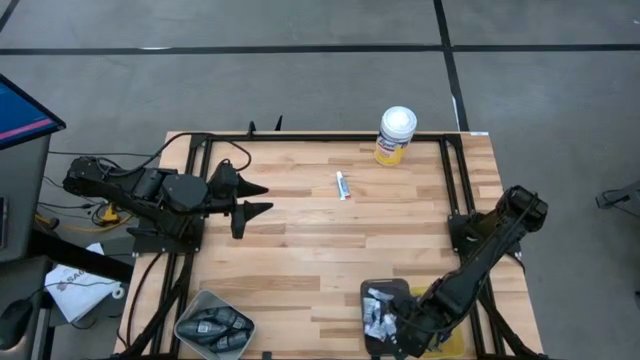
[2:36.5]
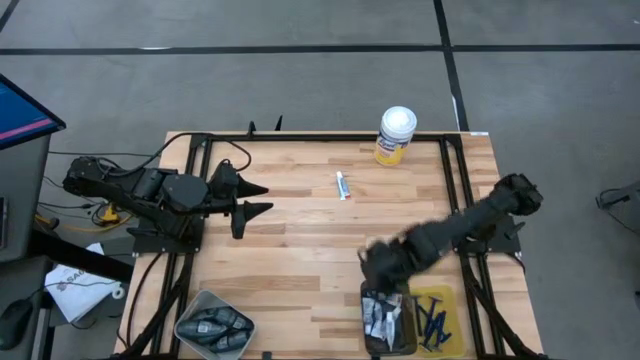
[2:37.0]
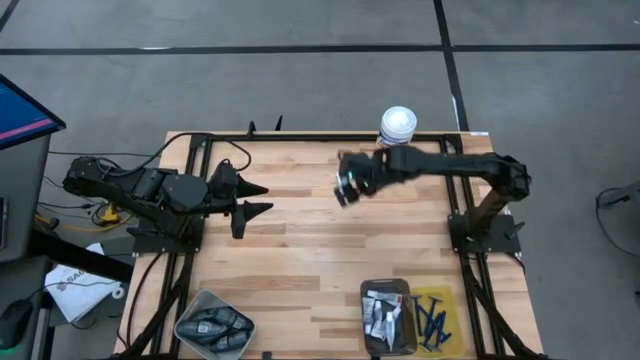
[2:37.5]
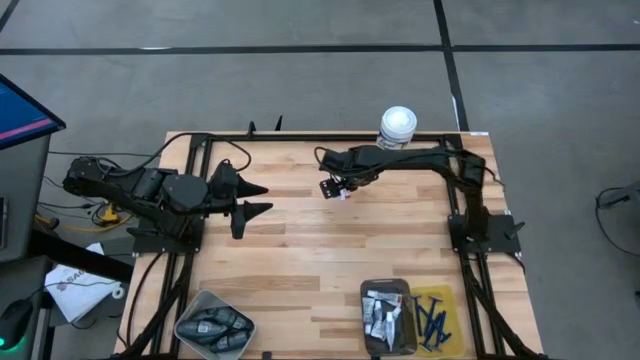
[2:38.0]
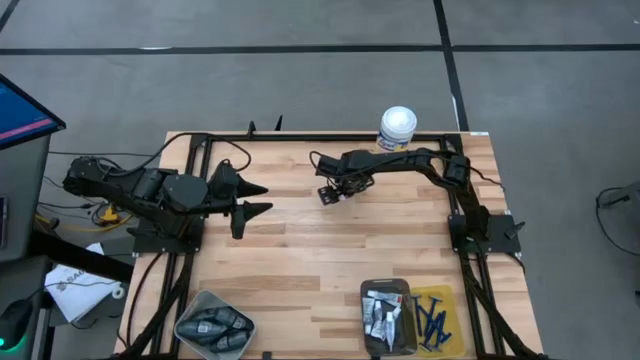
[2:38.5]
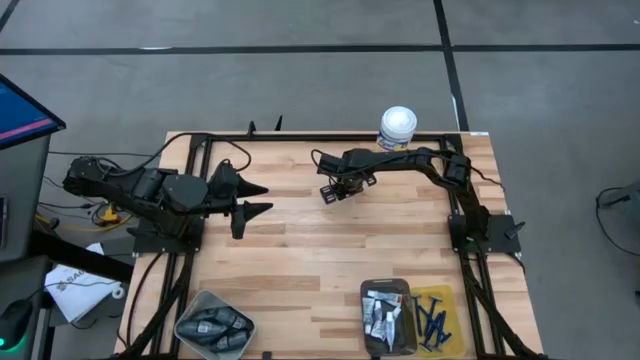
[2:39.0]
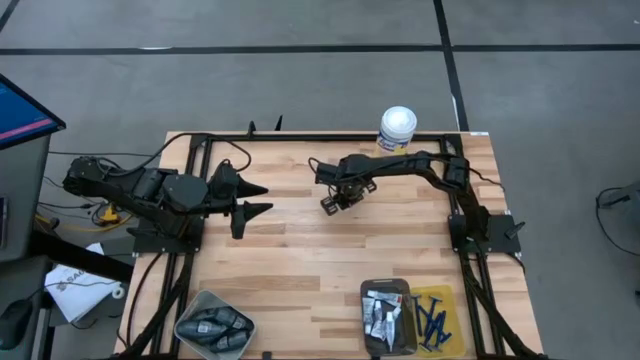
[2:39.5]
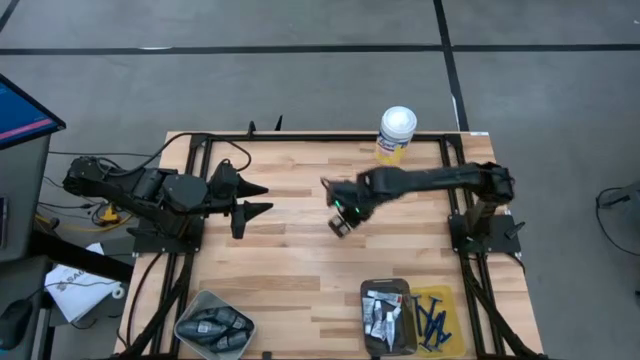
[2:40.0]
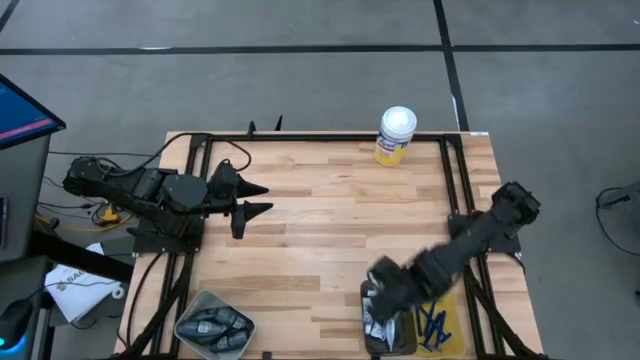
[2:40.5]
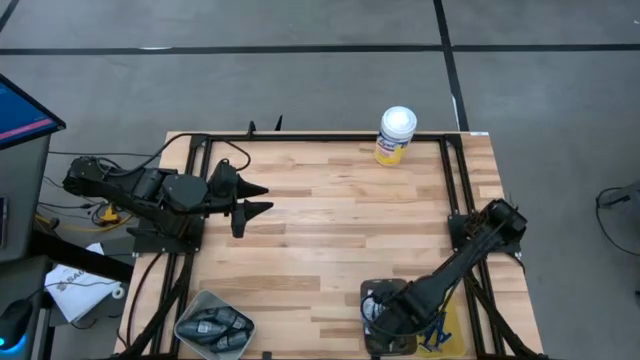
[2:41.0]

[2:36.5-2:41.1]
Task: Pick & Place Travel size toiletries
Put the toothpaste into the black bin

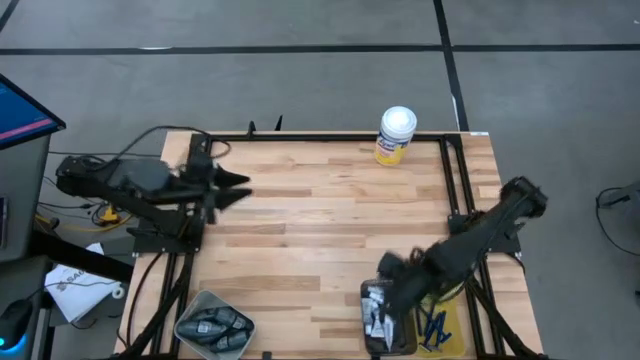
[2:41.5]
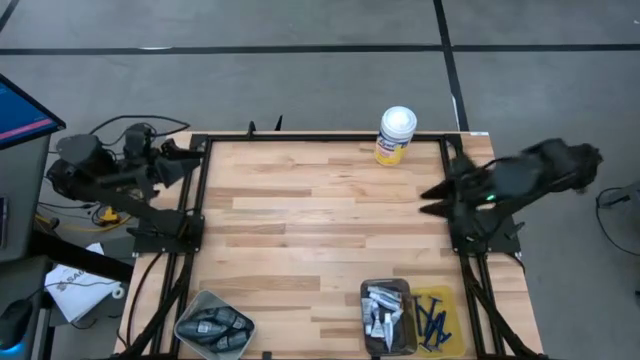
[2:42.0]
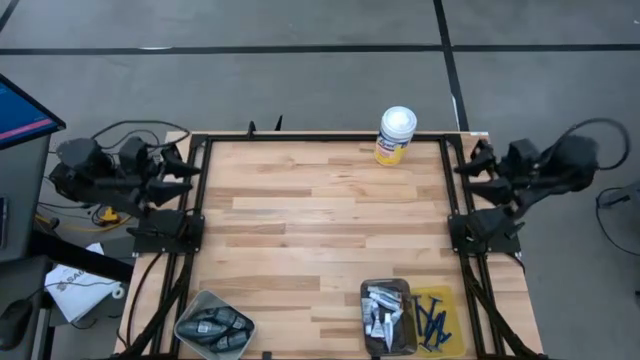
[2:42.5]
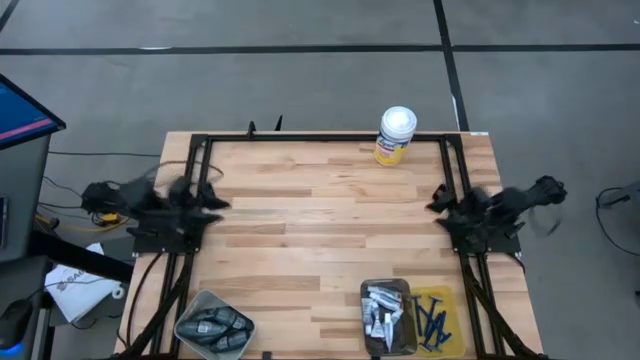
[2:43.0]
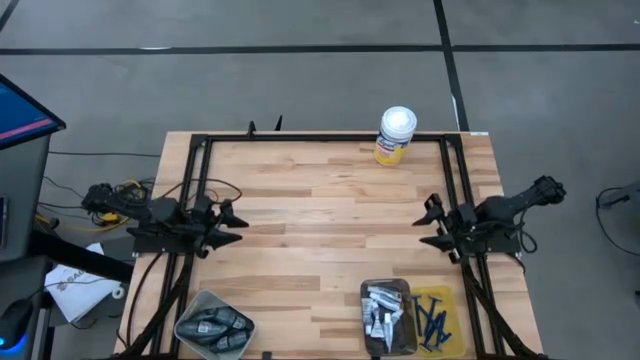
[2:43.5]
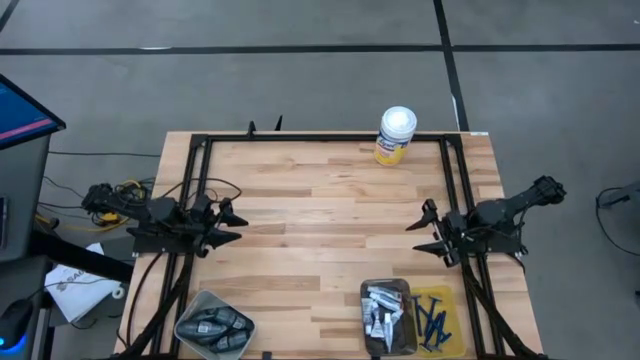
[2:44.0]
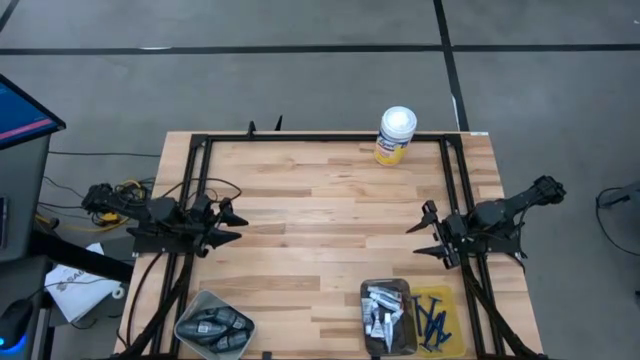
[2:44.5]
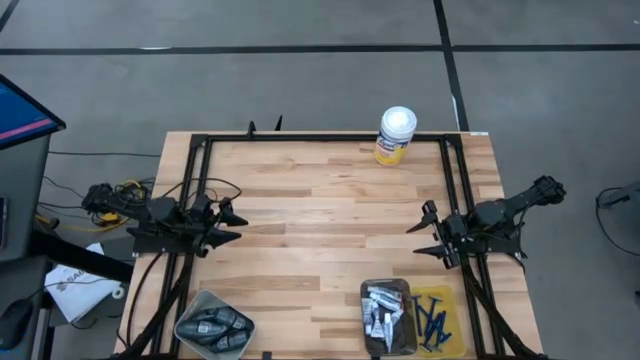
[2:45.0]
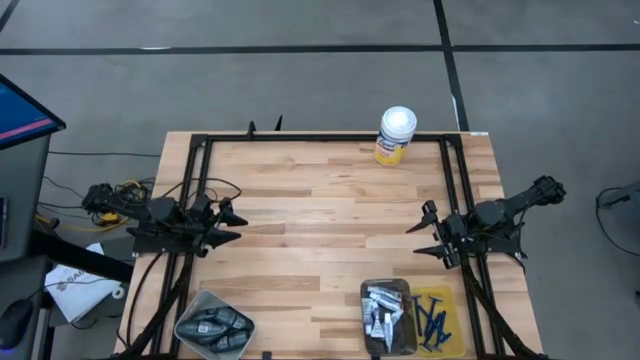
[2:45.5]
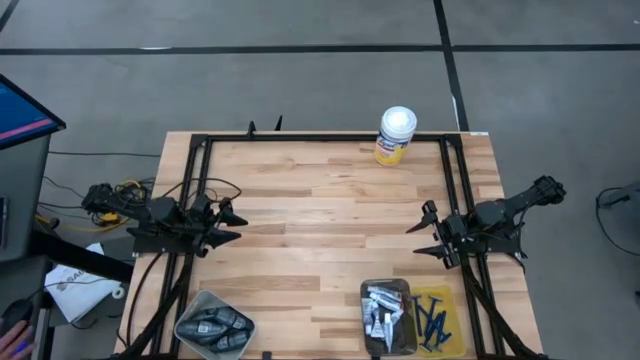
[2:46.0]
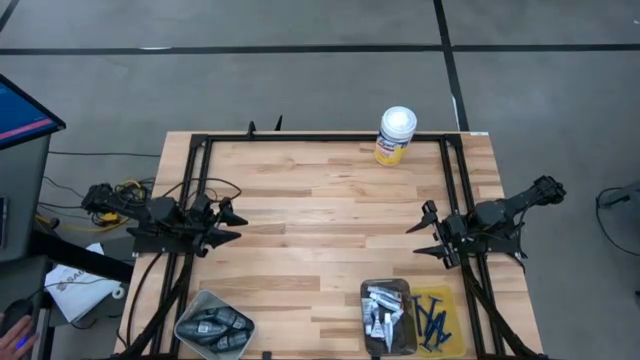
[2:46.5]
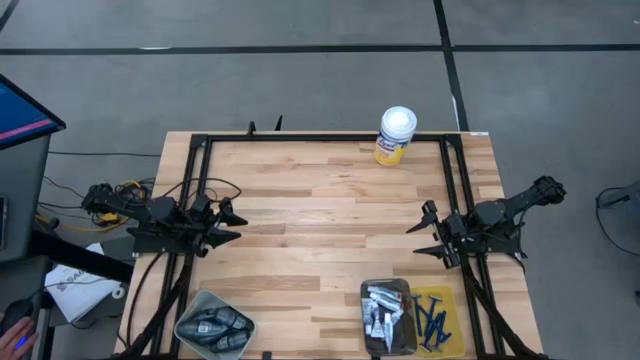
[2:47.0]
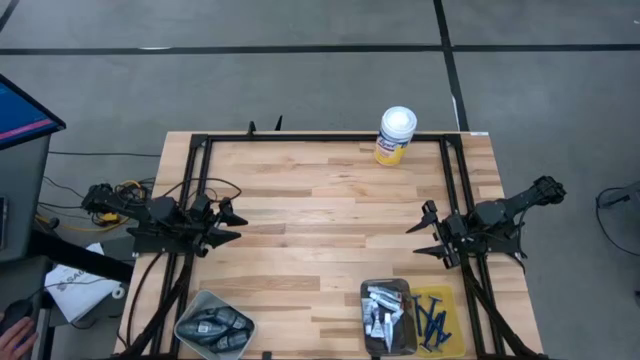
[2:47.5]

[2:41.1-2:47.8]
Return to Home Position

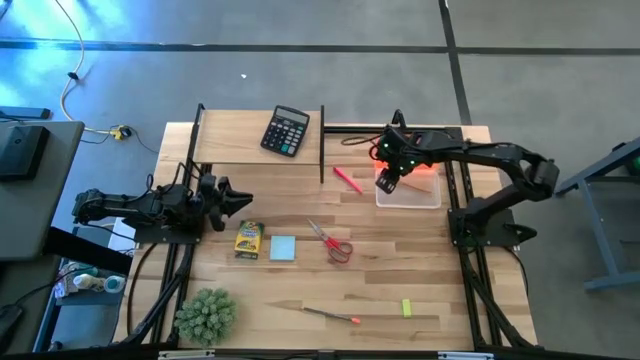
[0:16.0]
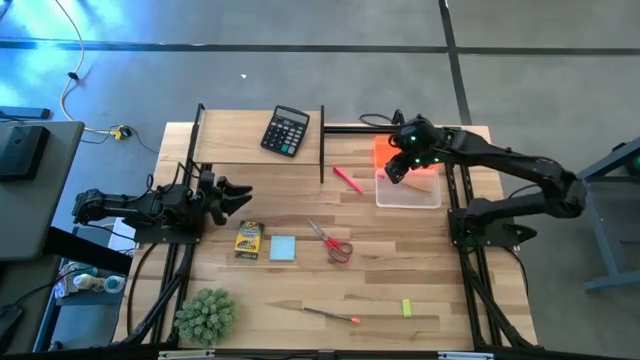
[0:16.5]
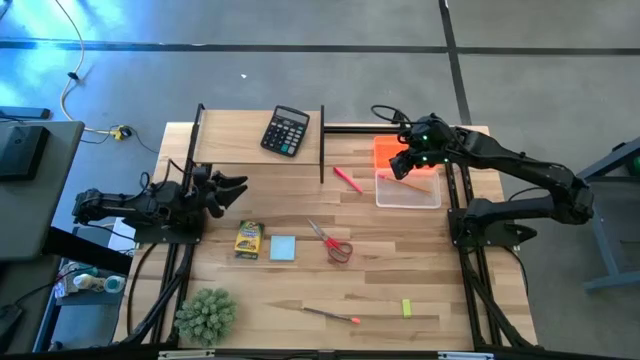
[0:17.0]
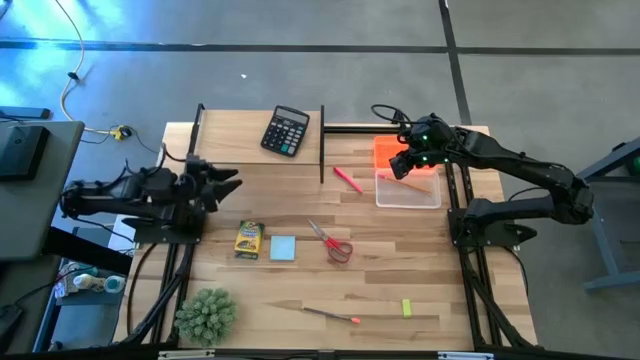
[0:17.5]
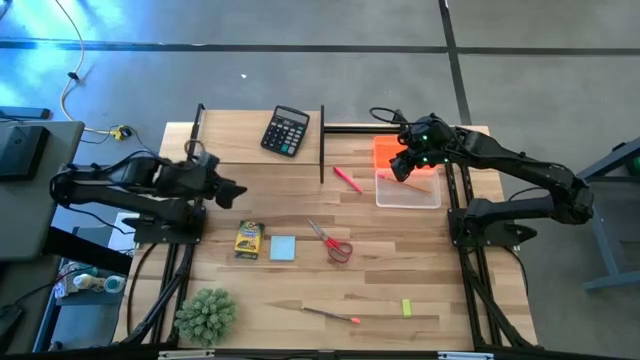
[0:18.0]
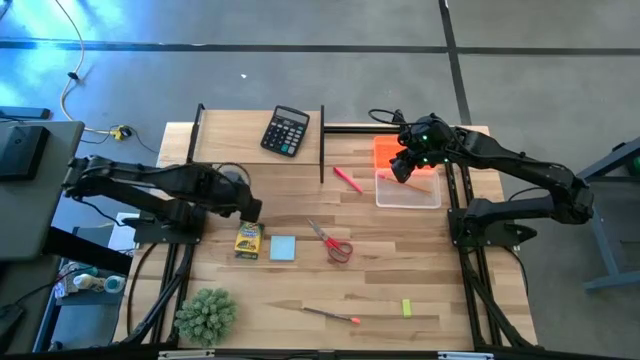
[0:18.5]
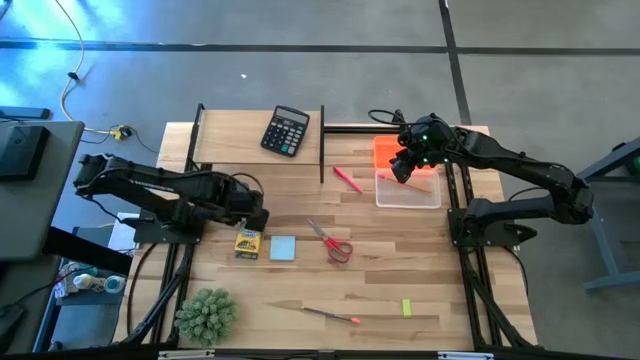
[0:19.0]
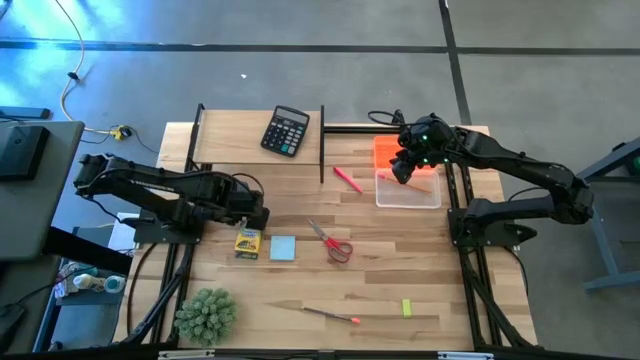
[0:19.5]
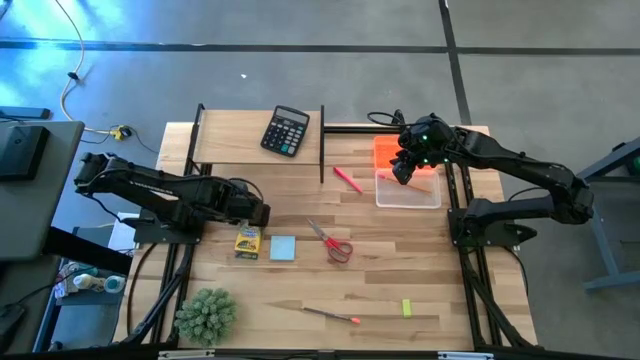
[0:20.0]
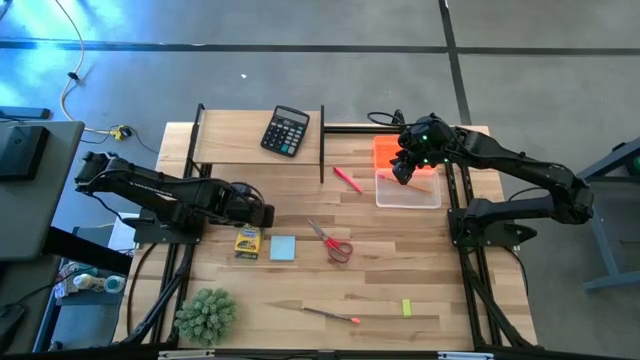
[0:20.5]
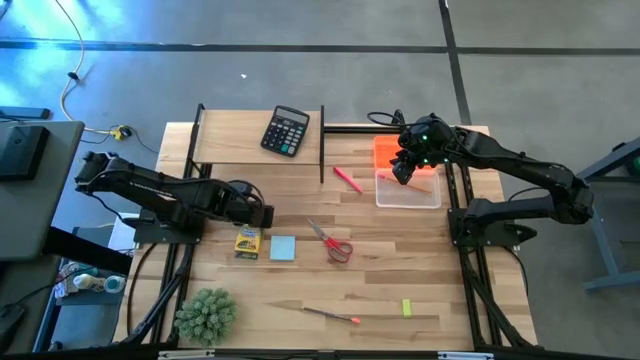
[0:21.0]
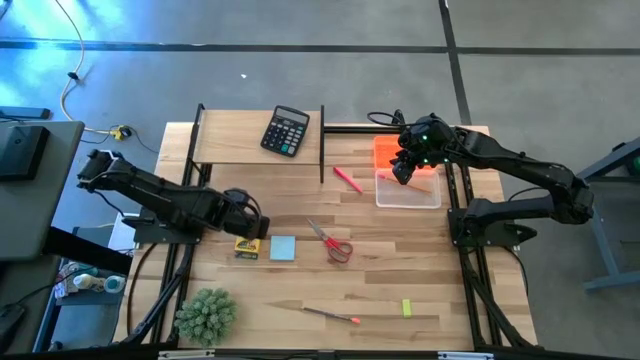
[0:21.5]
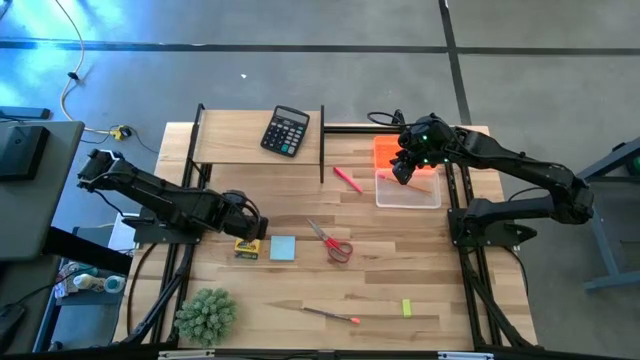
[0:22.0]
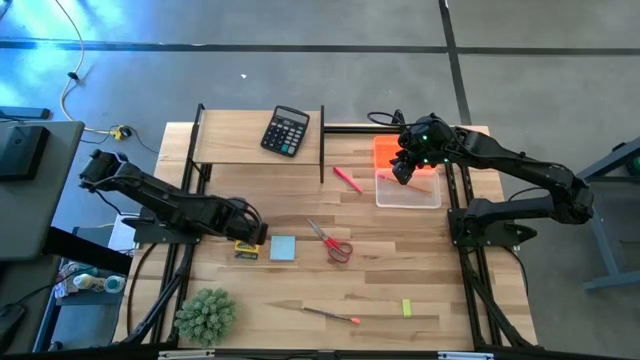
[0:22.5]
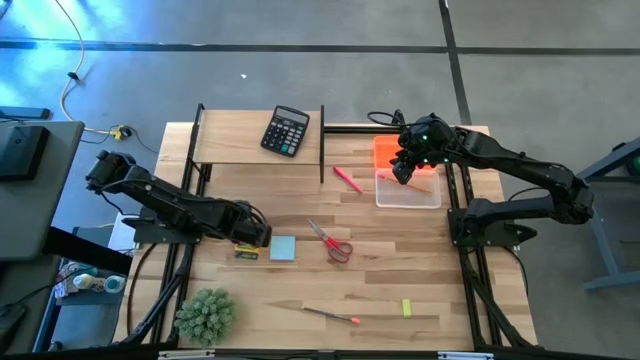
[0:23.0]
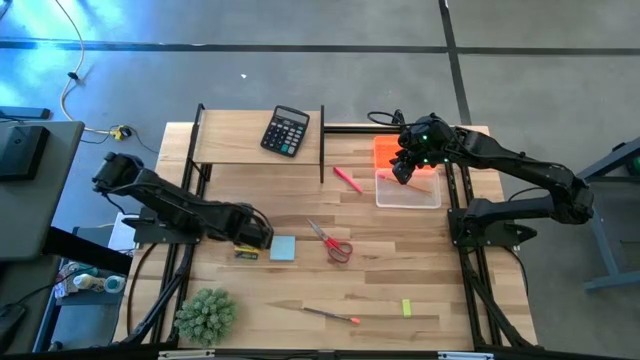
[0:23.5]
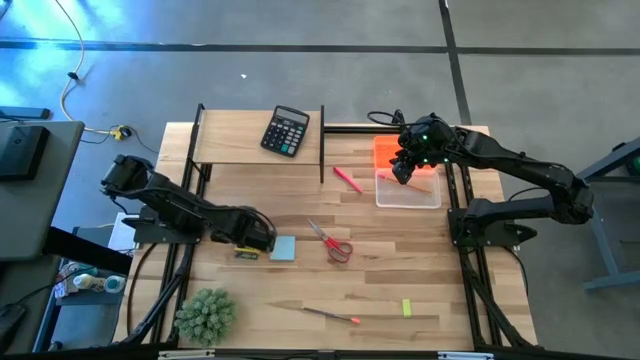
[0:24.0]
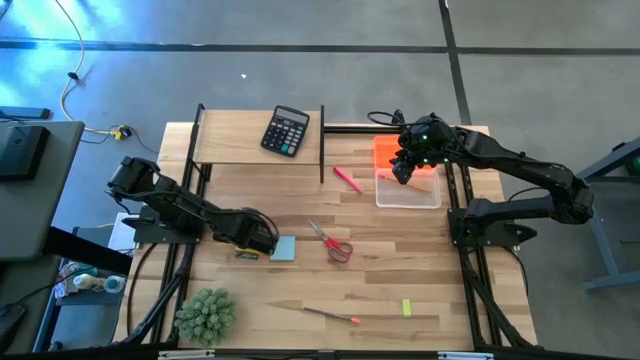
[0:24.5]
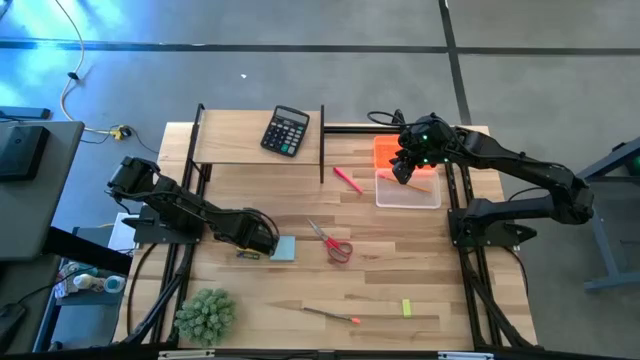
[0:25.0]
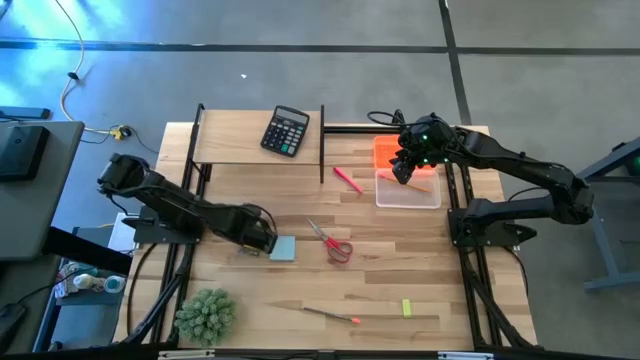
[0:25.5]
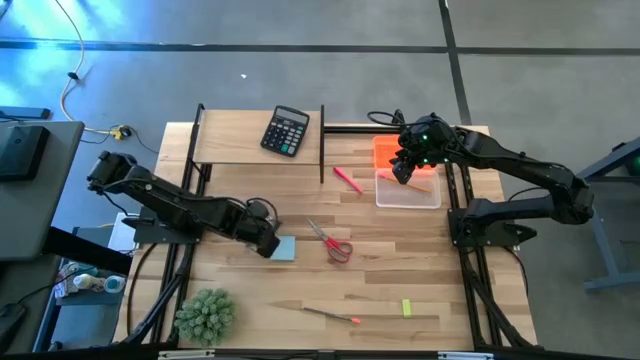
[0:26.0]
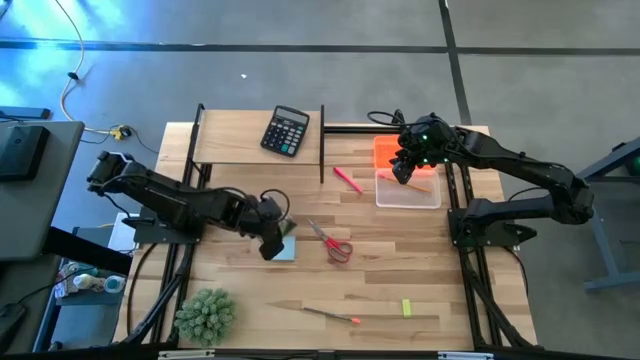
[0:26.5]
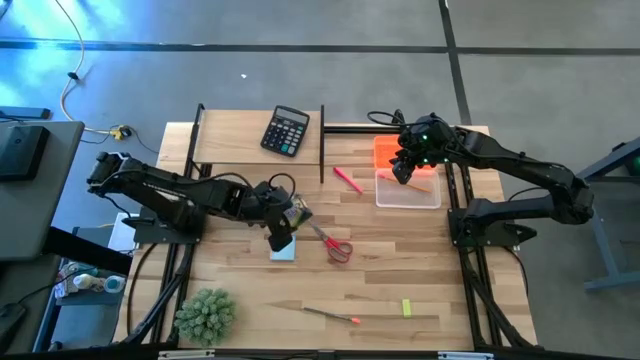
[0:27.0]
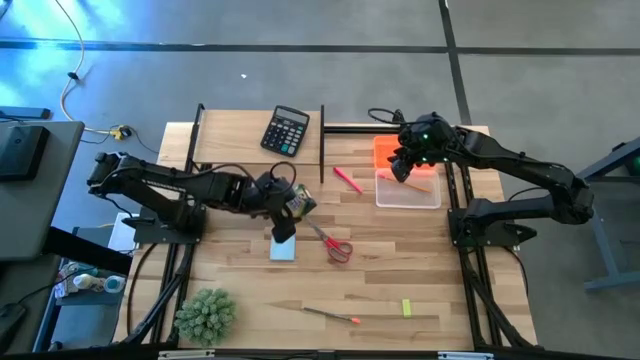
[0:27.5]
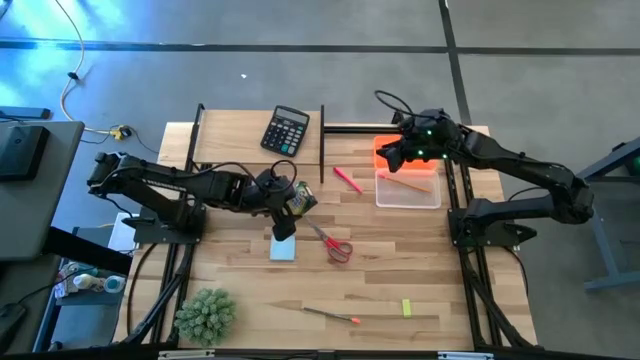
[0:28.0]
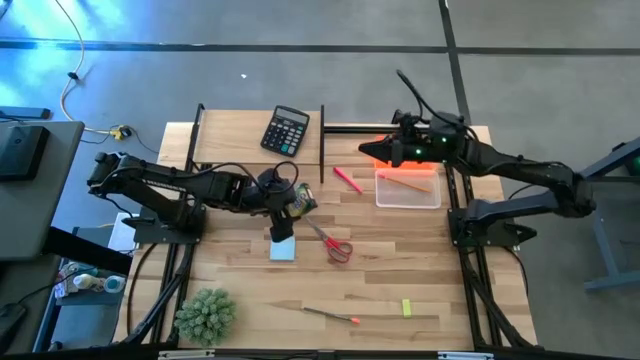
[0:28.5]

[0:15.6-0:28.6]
Task: Pack school essentials
Put the yellow crayon box into the orange supply box
